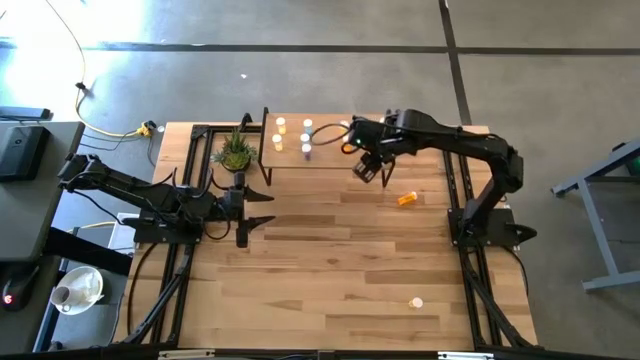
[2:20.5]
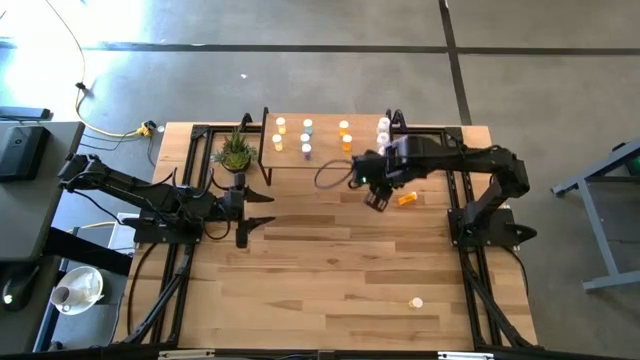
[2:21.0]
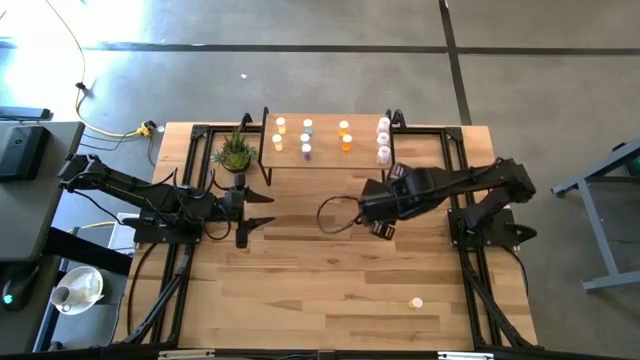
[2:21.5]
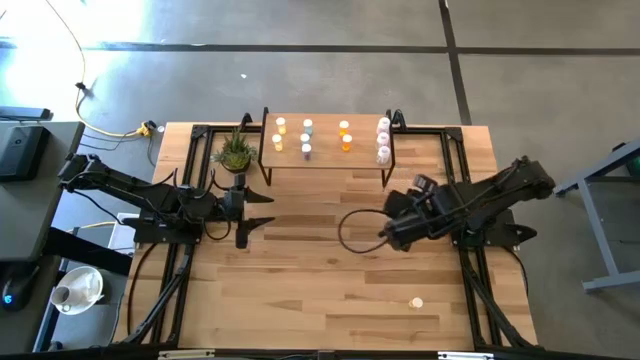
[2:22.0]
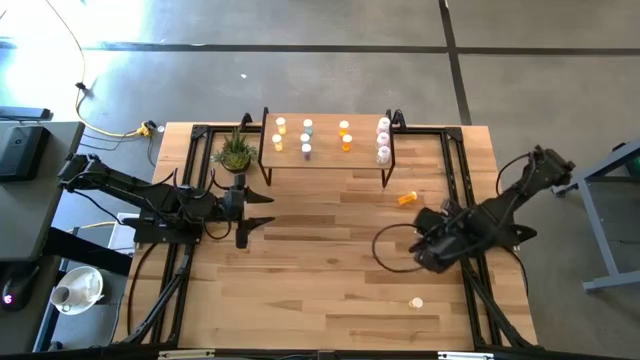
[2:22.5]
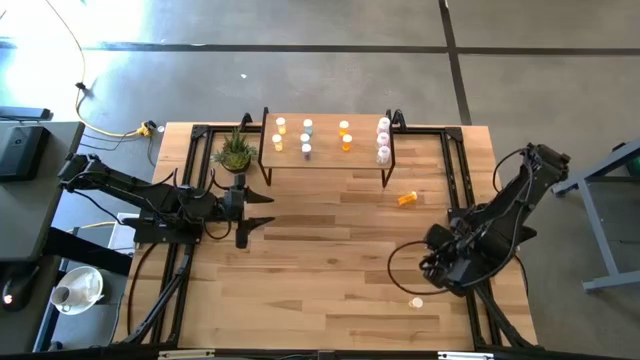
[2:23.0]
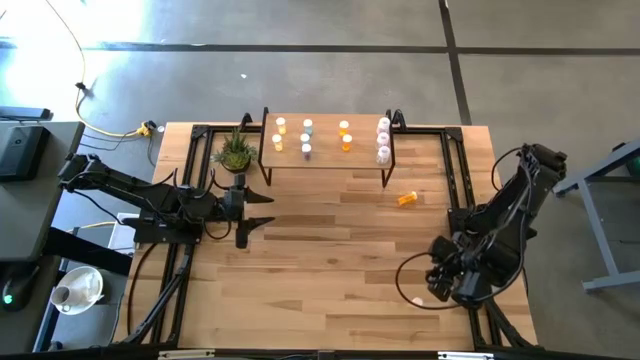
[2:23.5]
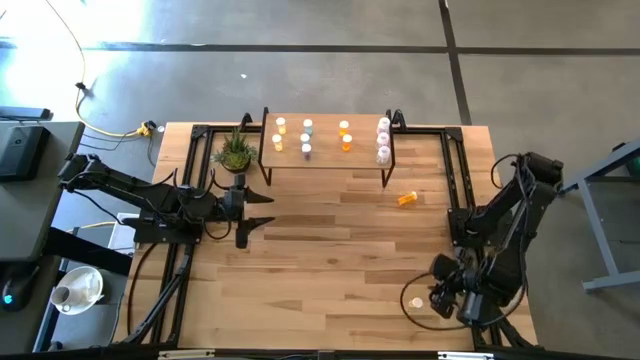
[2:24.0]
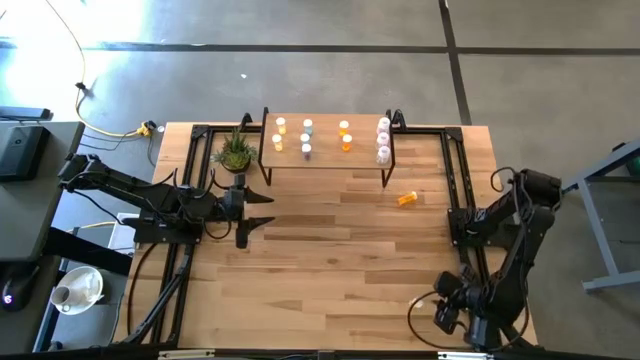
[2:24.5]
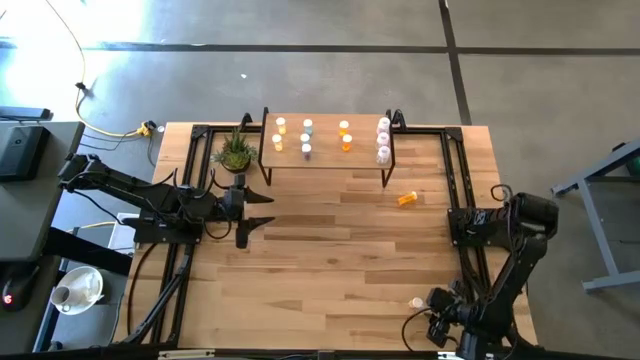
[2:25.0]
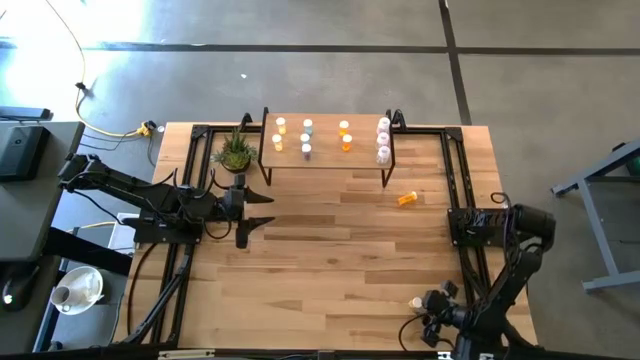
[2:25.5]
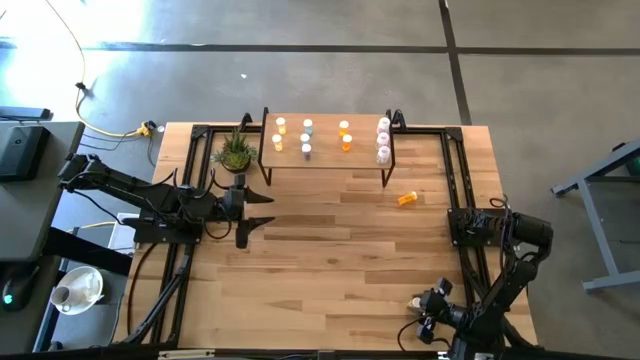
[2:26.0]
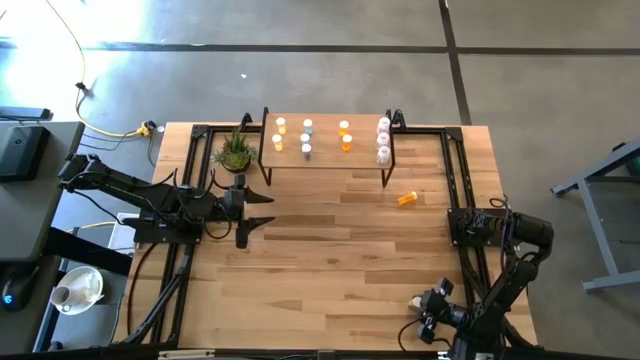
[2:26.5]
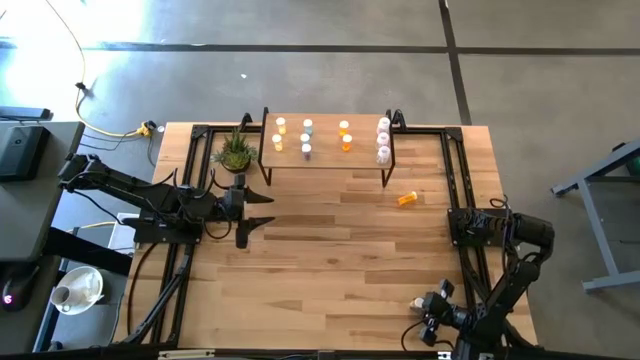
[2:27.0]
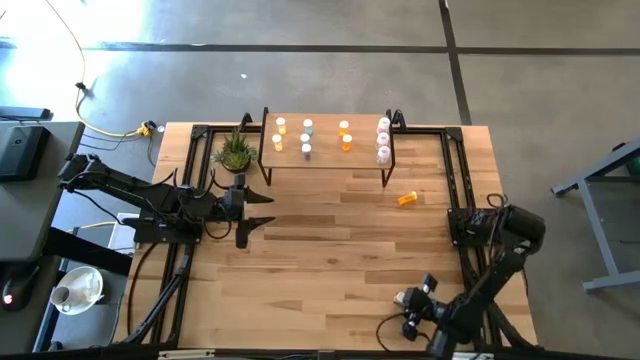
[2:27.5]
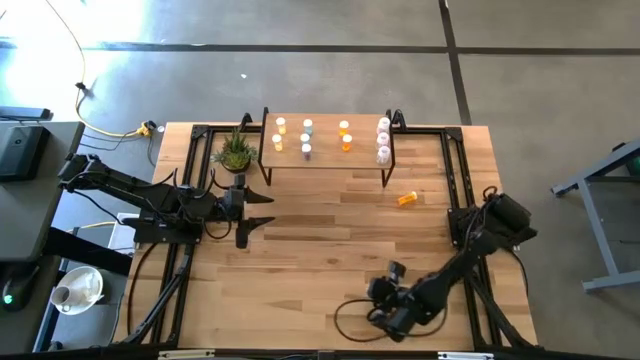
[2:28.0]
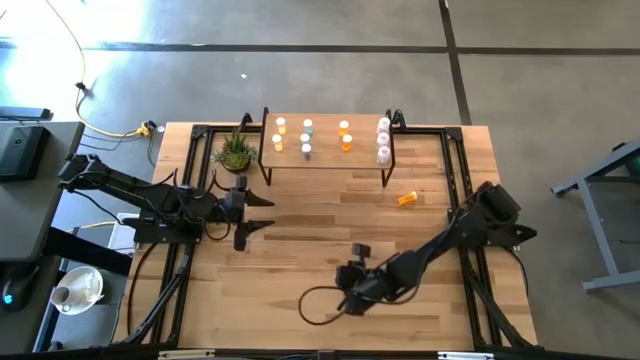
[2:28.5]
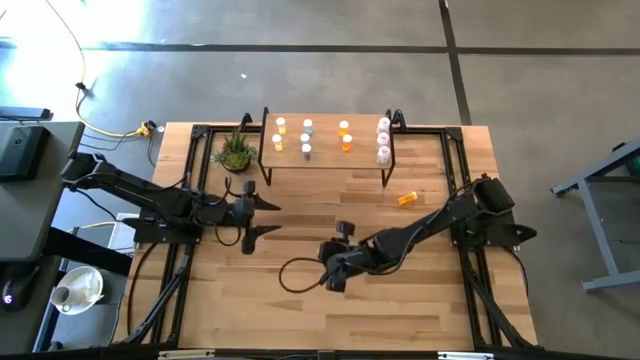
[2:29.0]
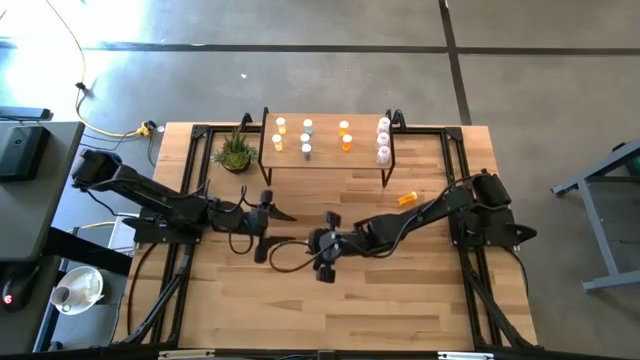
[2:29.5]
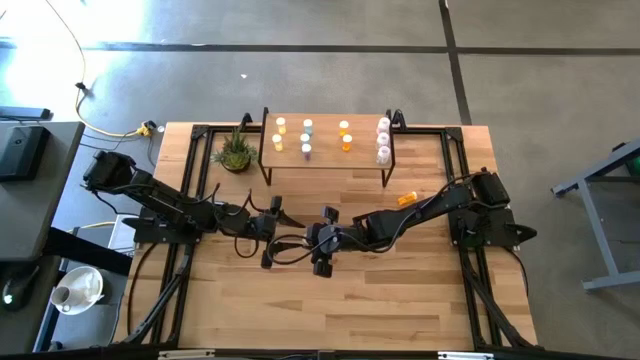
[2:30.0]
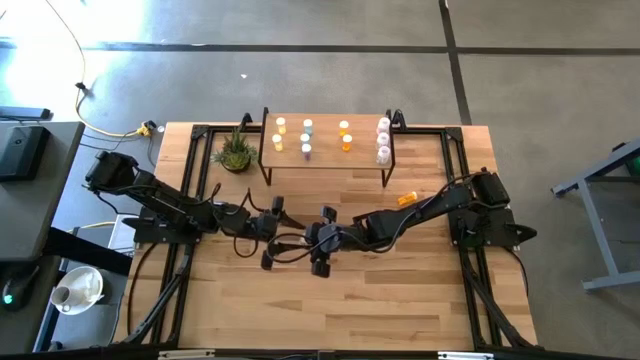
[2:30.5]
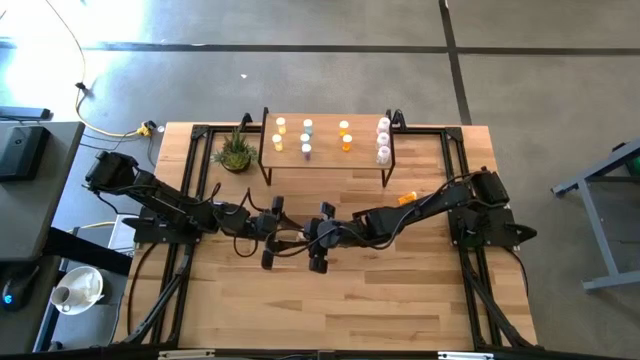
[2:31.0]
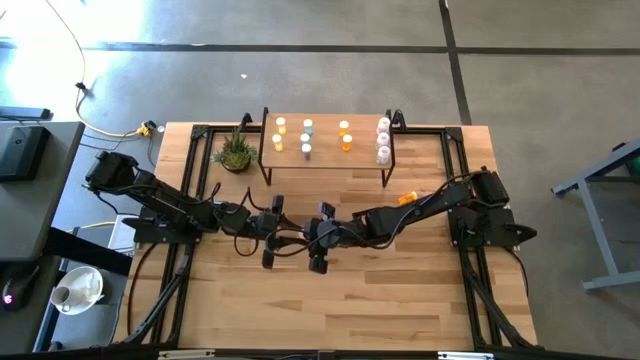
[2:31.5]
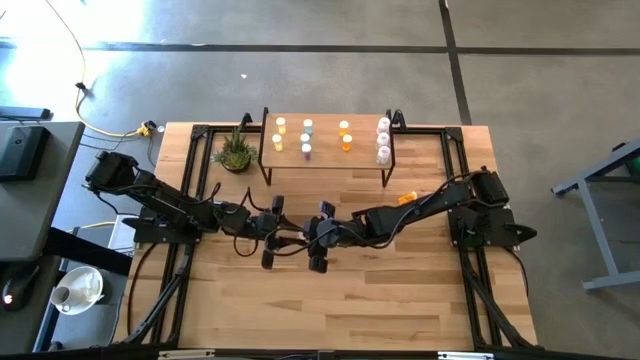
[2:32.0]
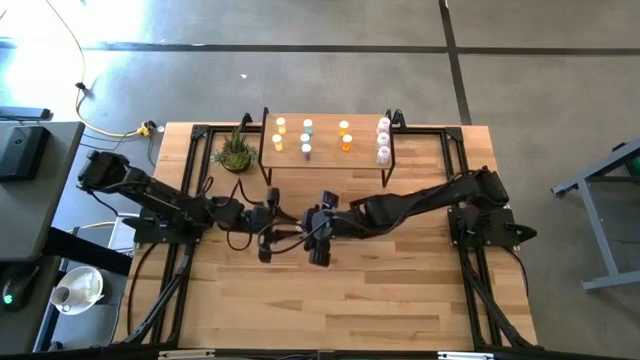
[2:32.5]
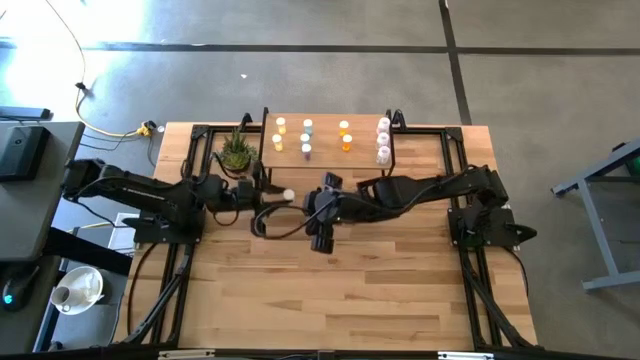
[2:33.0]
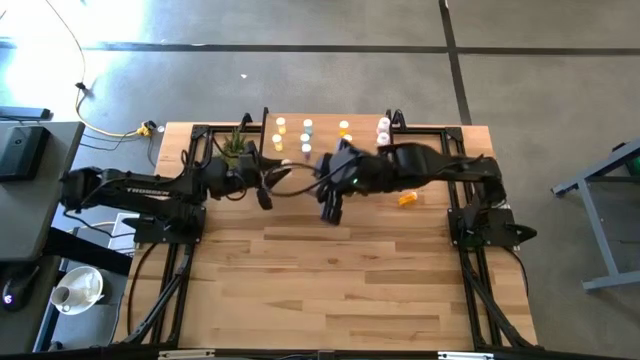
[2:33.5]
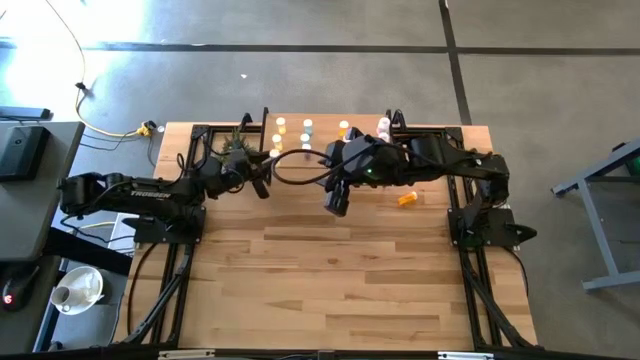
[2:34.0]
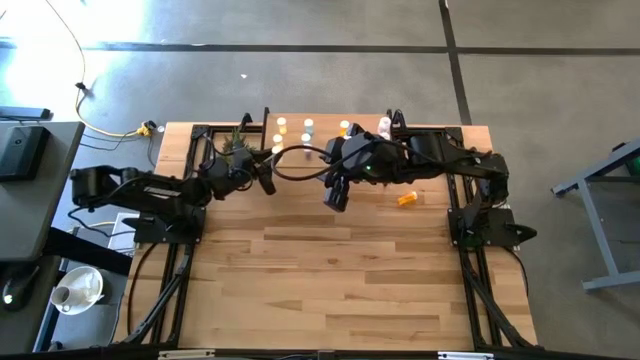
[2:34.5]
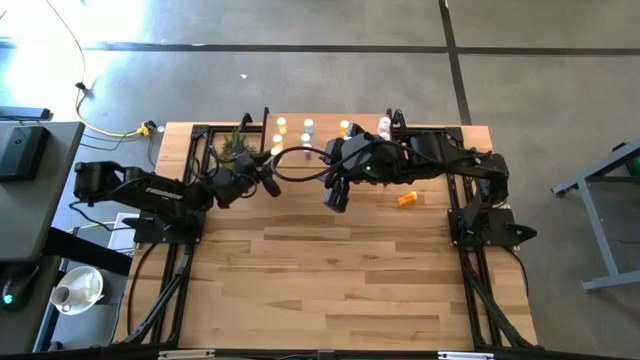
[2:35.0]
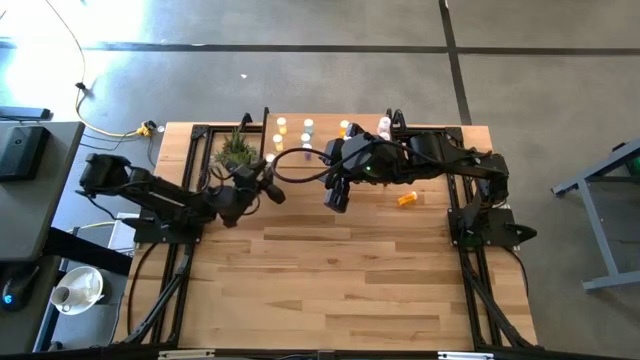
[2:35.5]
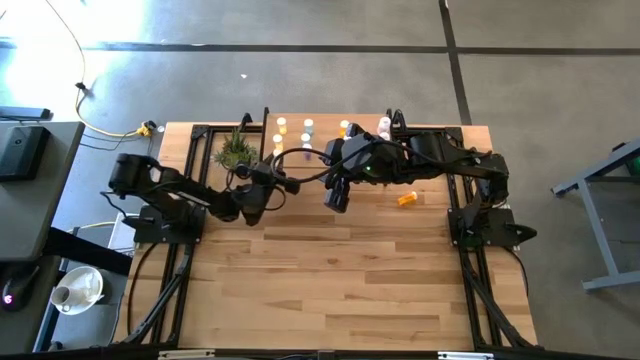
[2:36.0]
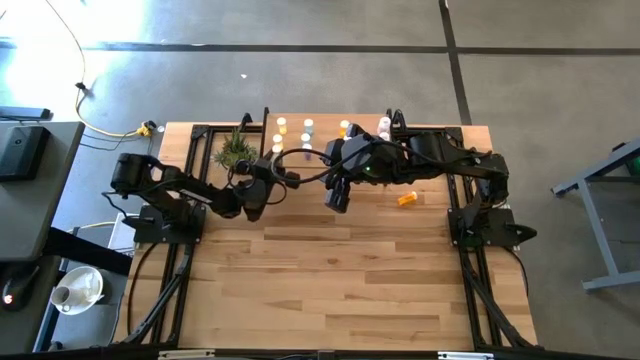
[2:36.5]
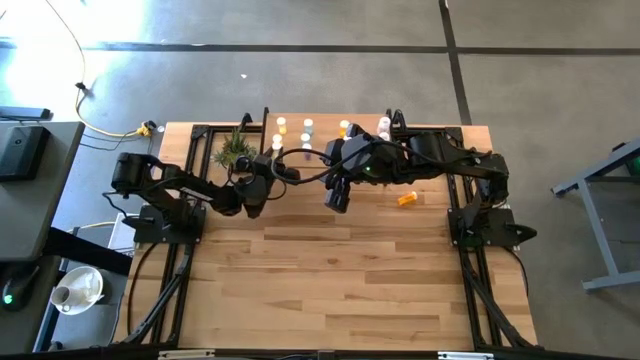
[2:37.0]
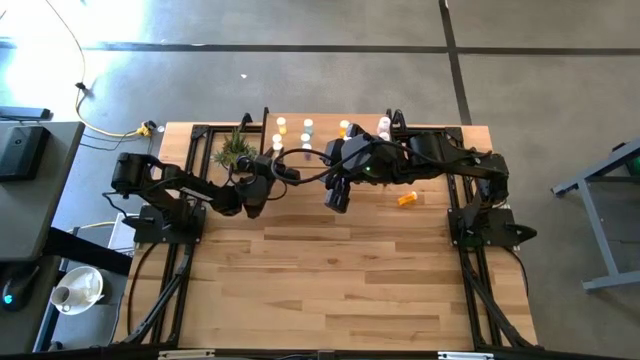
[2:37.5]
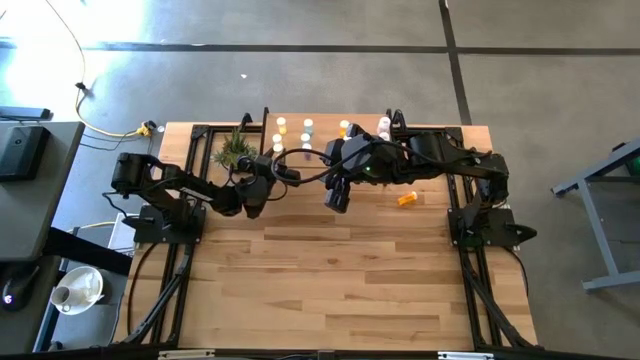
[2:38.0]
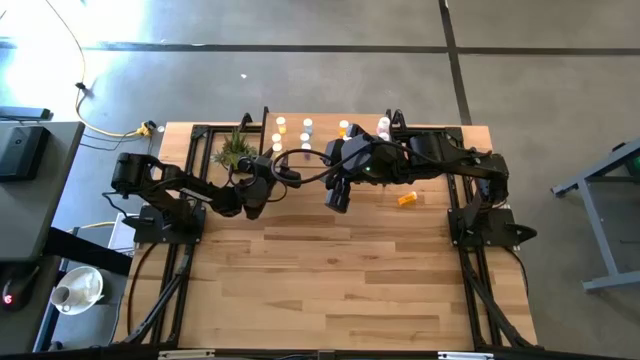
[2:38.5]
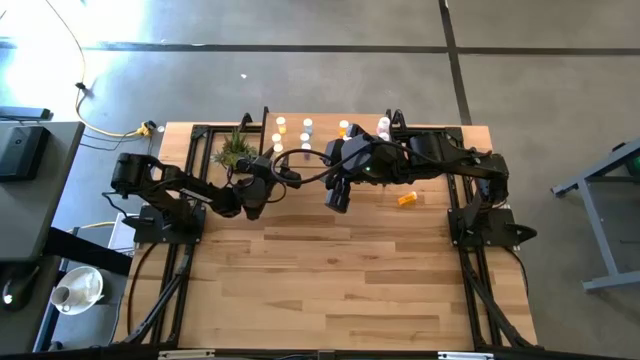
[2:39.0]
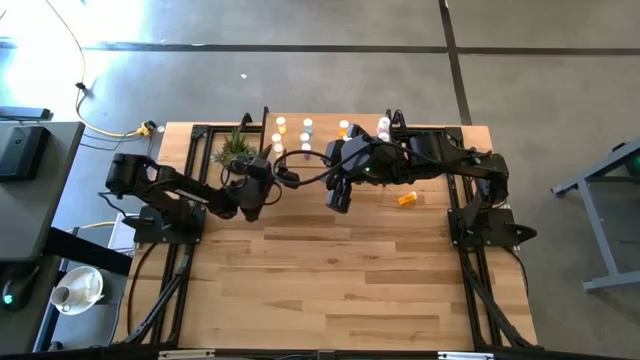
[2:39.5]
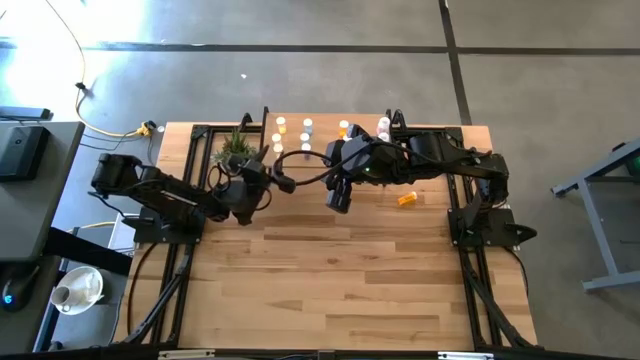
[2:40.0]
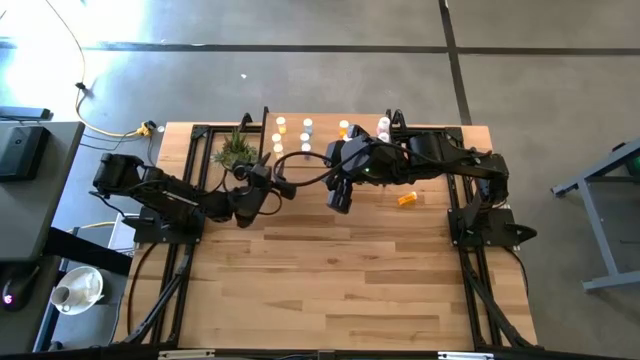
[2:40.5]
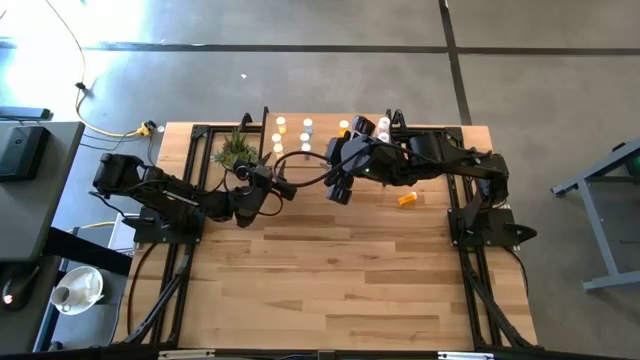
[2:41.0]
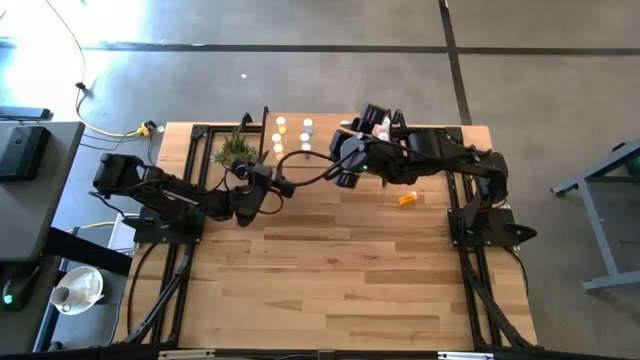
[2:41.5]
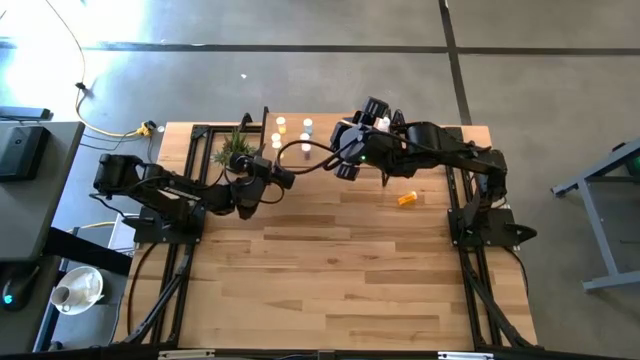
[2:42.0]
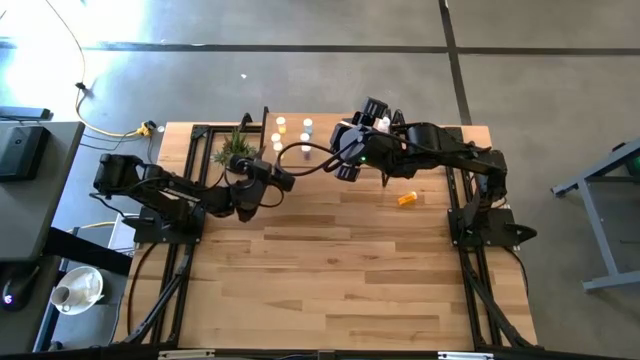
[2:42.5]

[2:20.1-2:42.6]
Task: Pick and place medicine bottles onto shelf by color
Put the yellow pill bottle on the shelf aligned with the other yellow pill bottles
